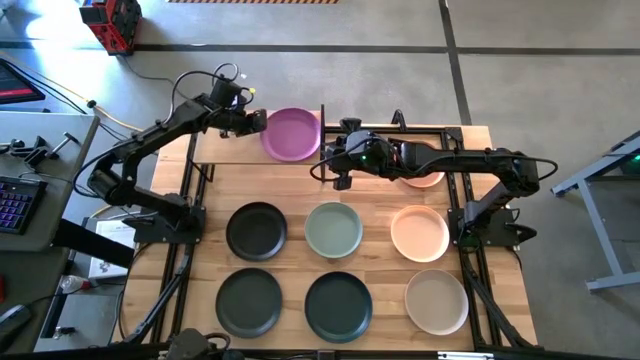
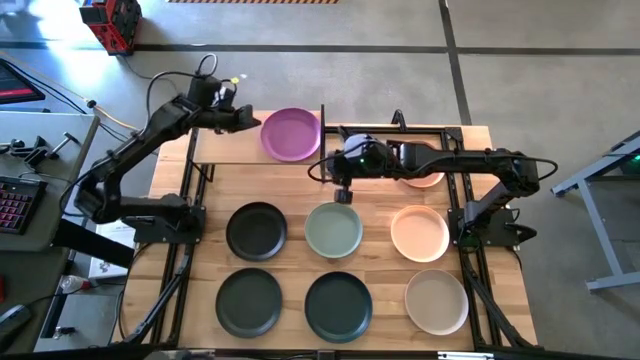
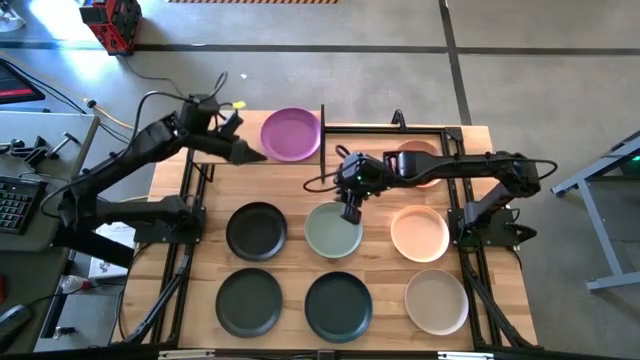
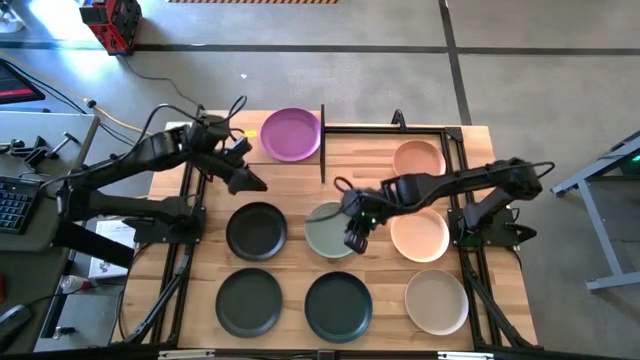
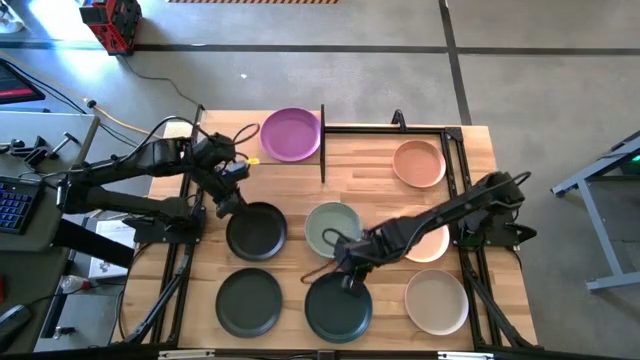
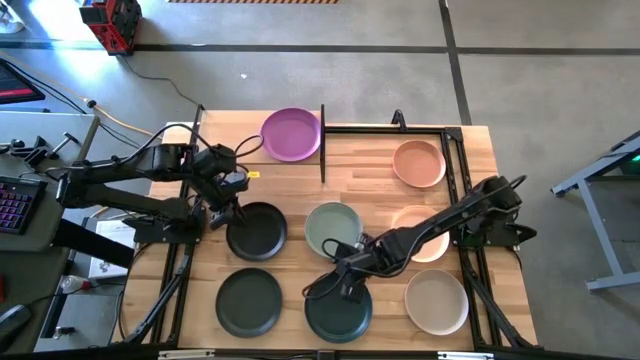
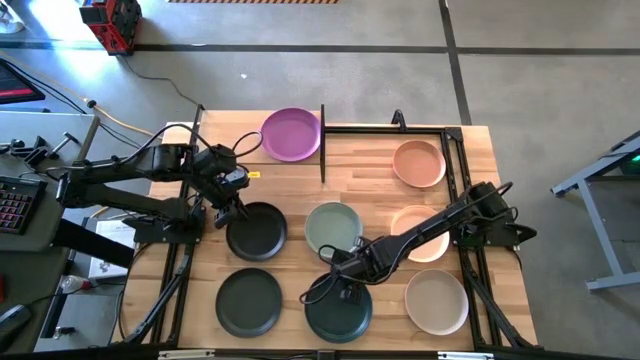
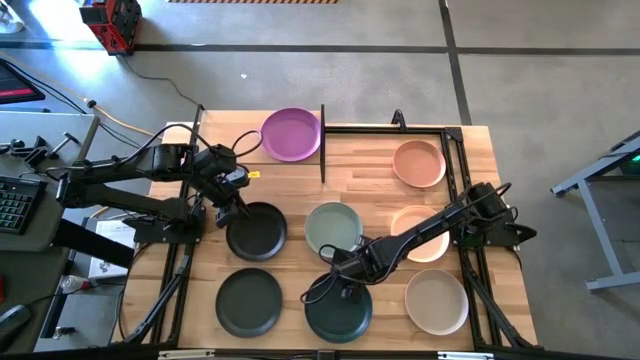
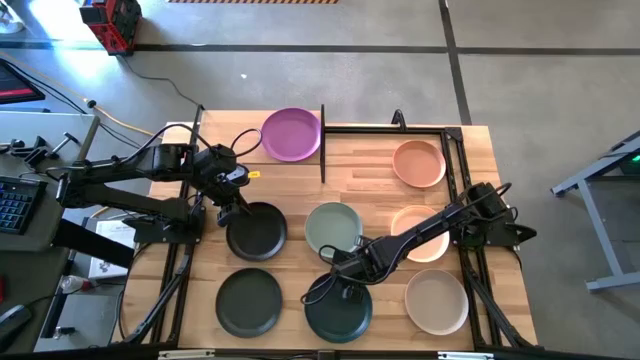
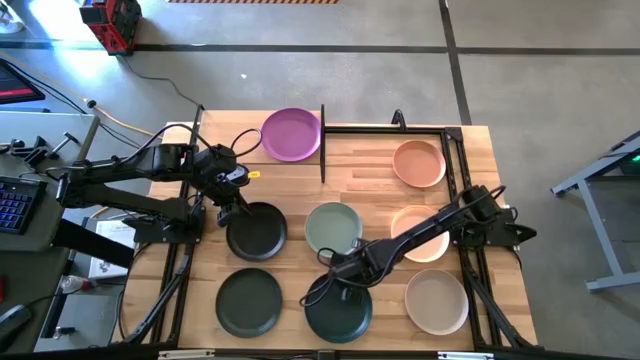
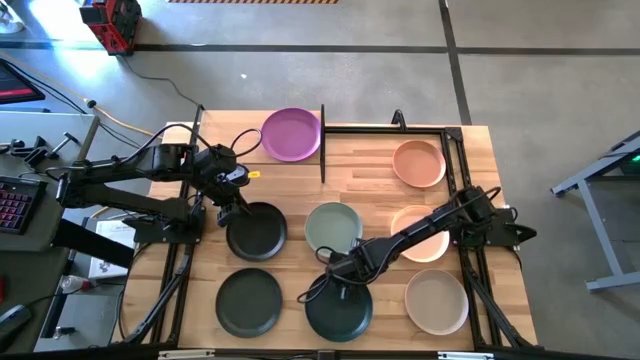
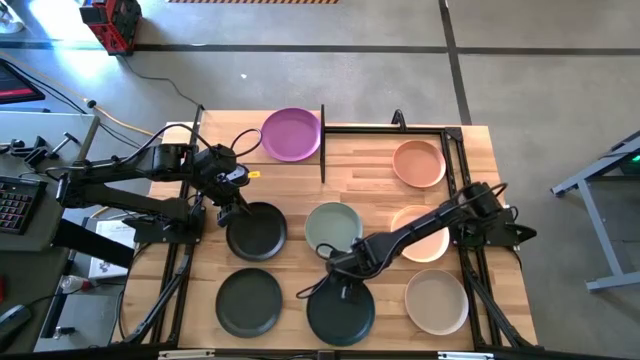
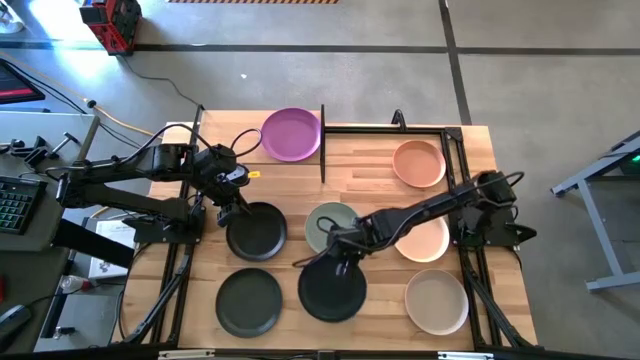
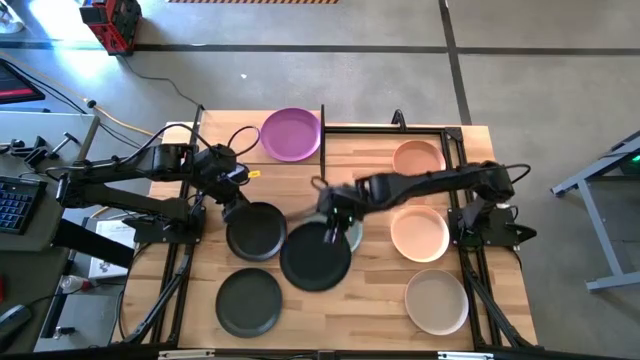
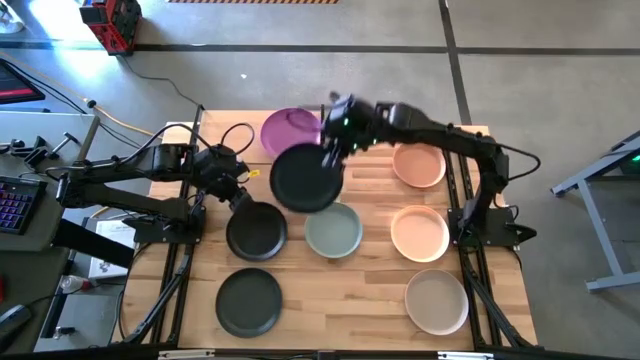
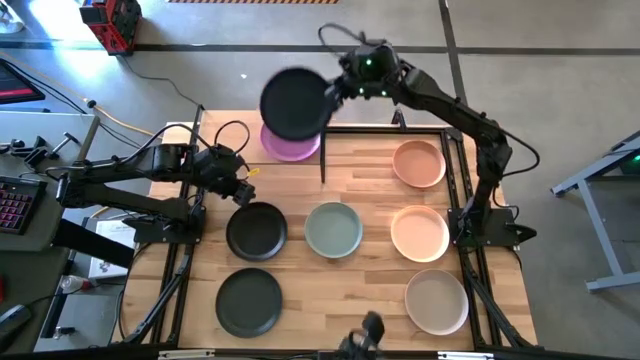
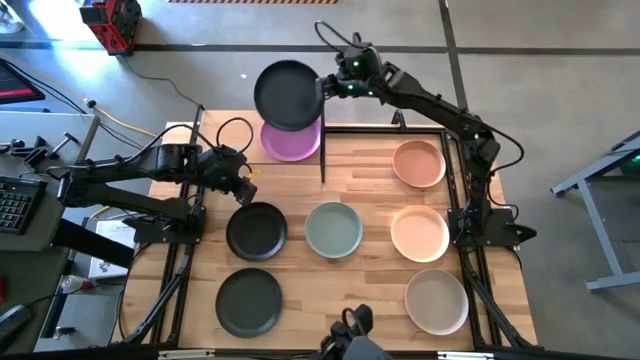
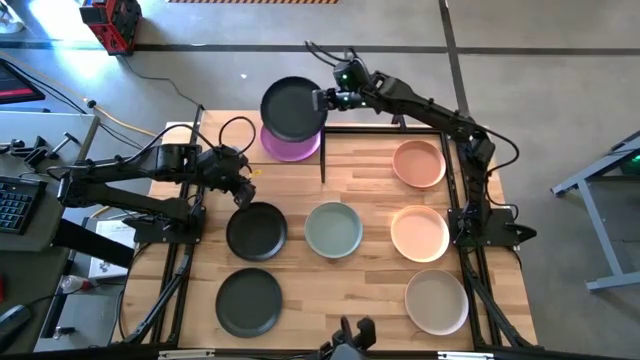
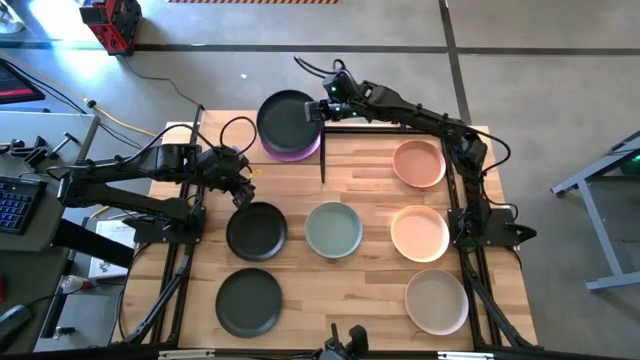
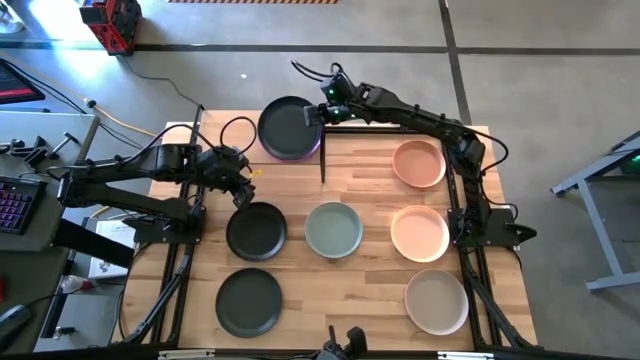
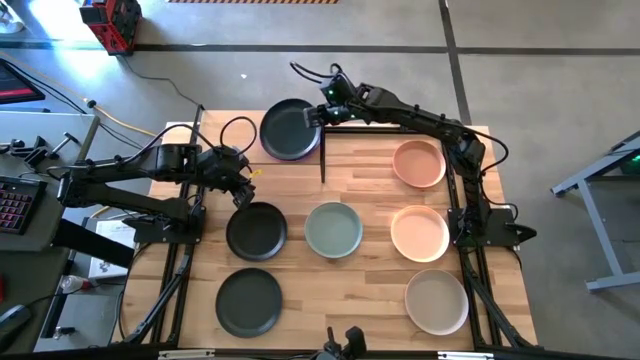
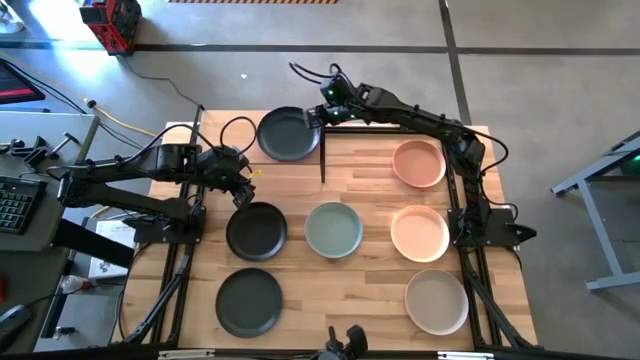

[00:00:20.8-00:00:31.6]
Task: Place and stack plates onto a shelf
Stack the bottom right black plate on top of the violet plate on the shelf

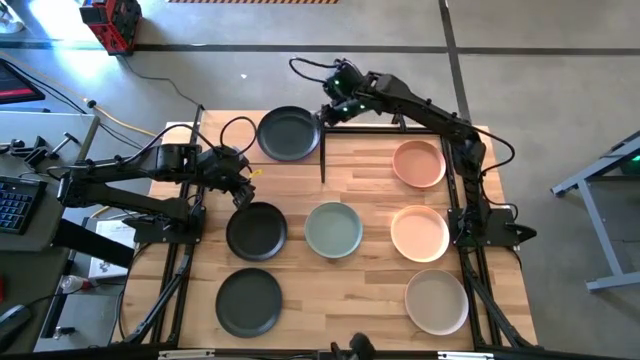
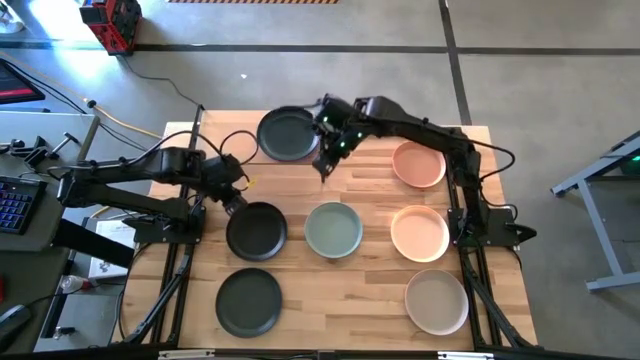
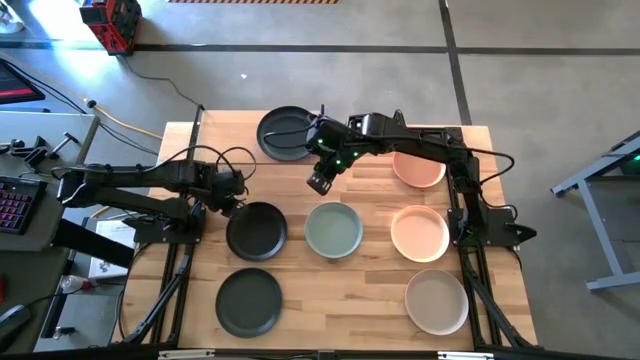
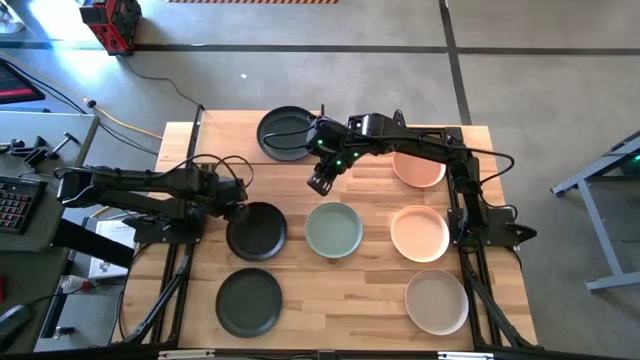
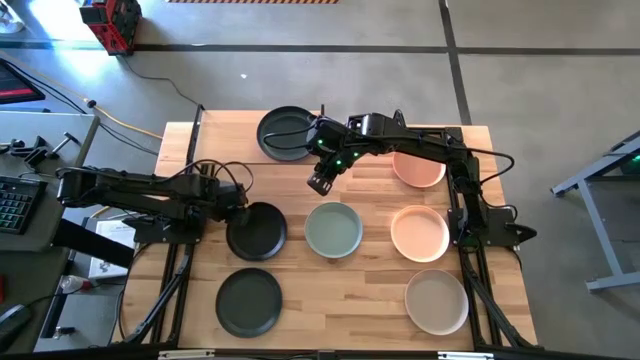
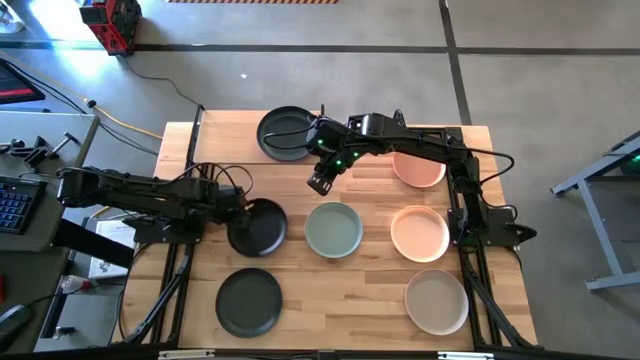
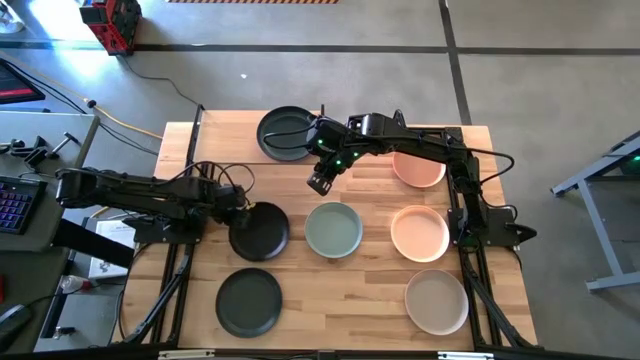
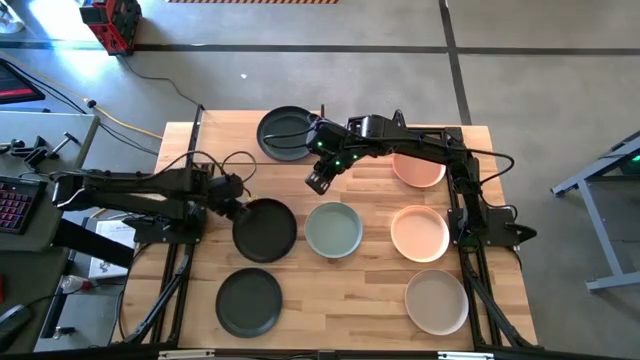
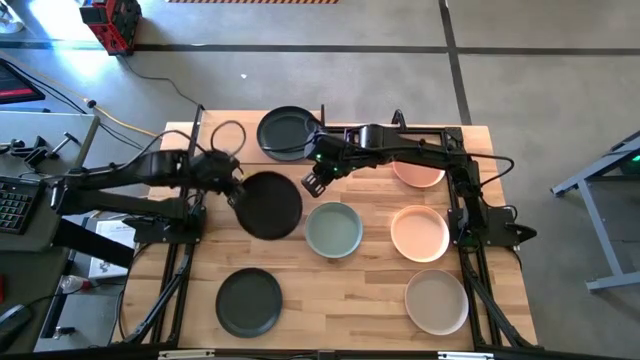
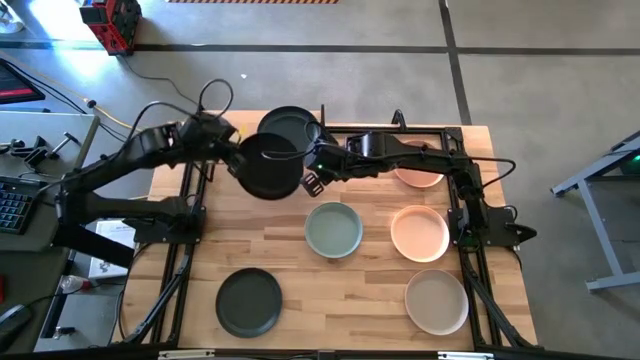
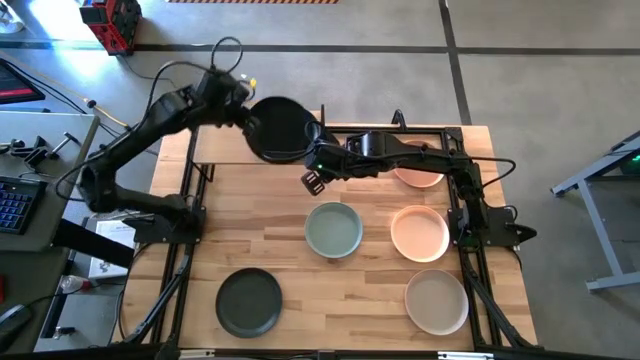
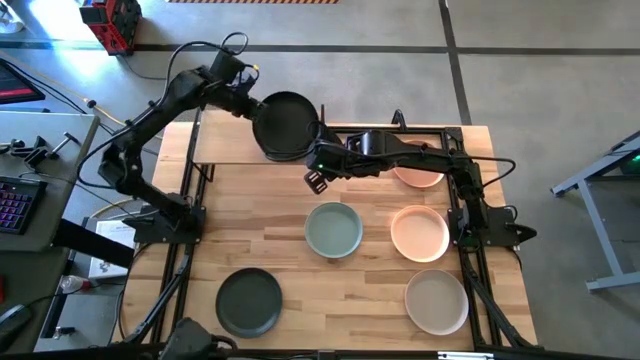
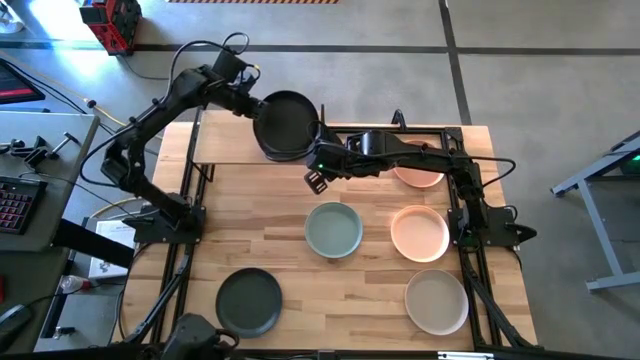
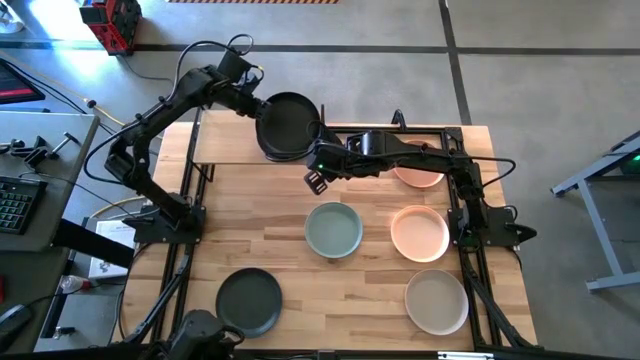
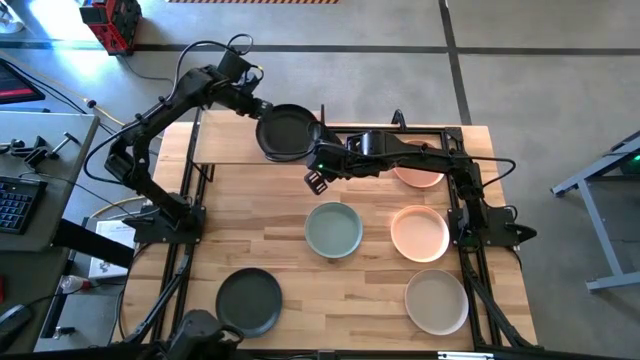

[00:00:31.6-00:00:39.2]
Stack the top black plate on top of the black plate on the shelf

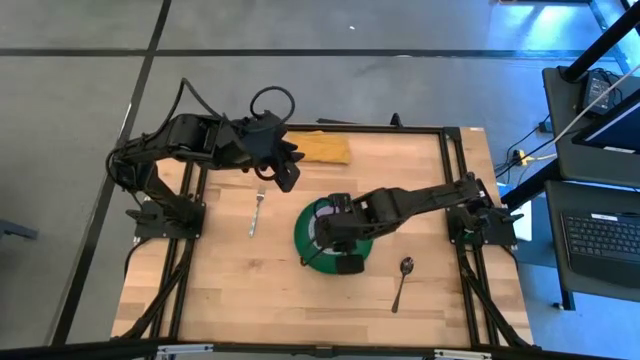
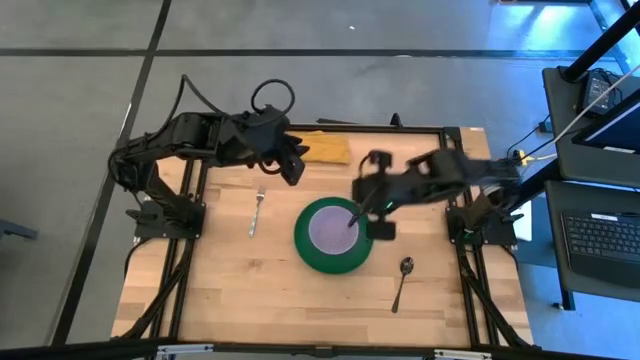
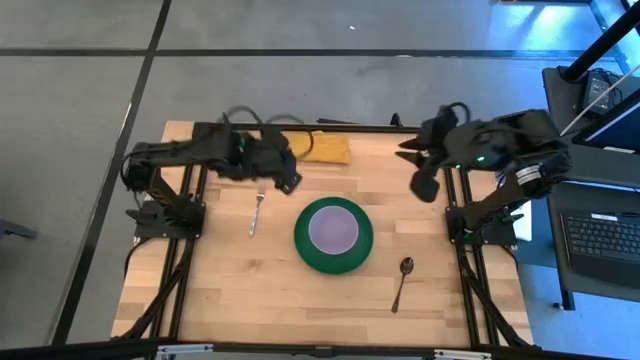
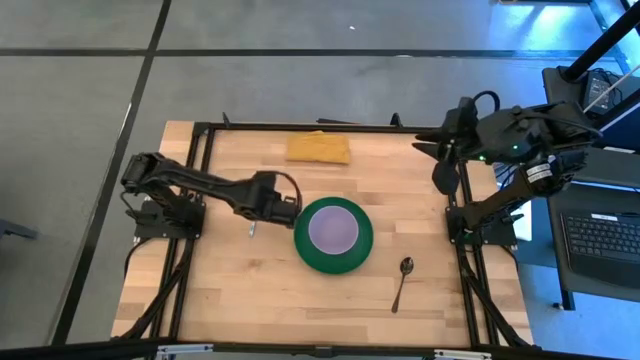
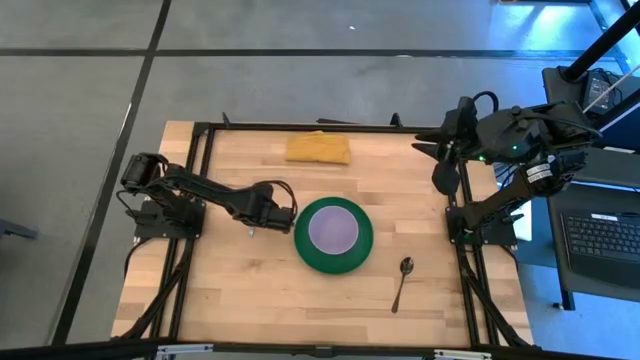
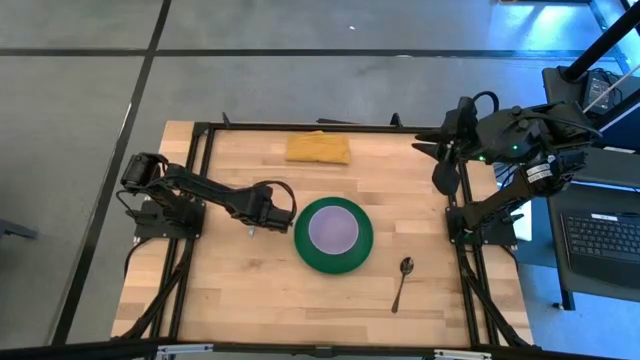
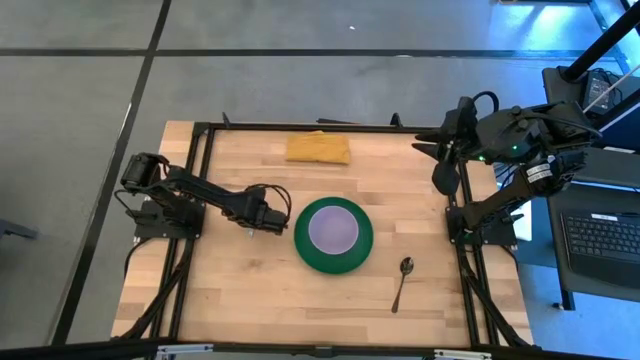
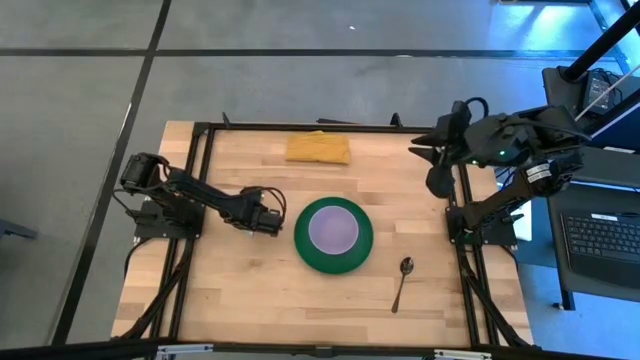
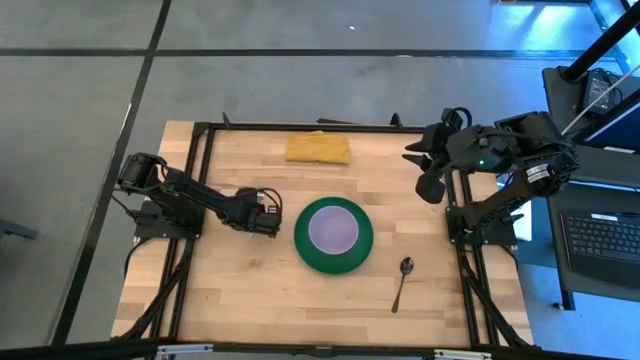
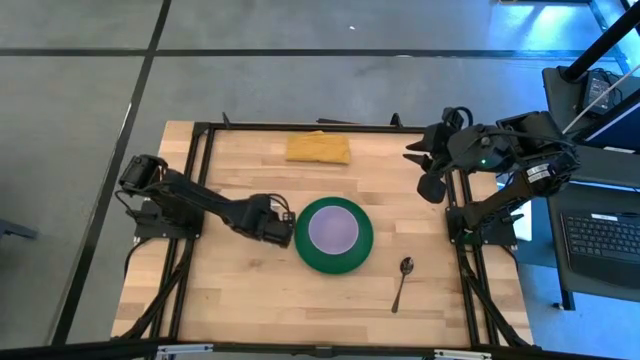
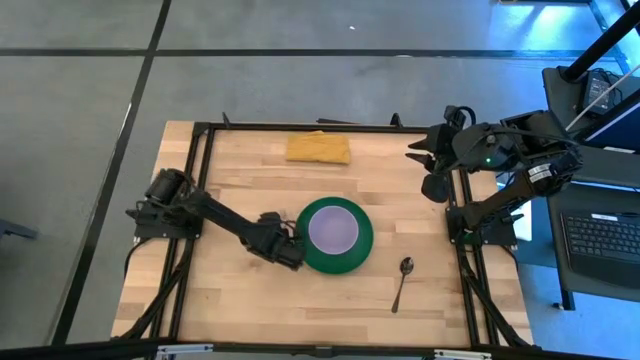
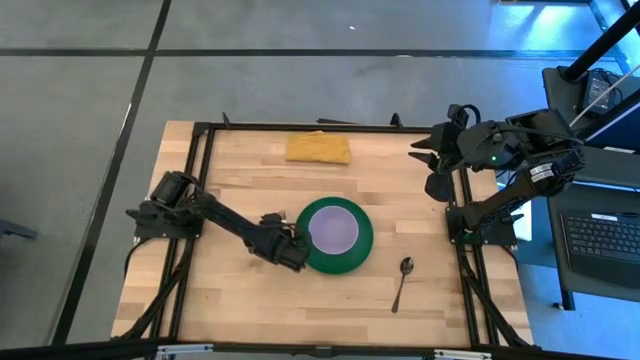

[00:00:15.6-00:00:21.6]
Task: Set table place
Move the fork to the left side of the green plate
